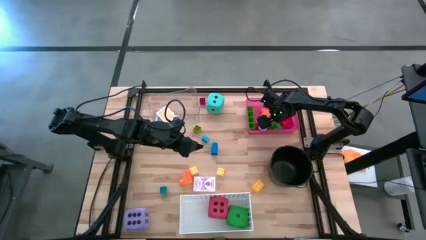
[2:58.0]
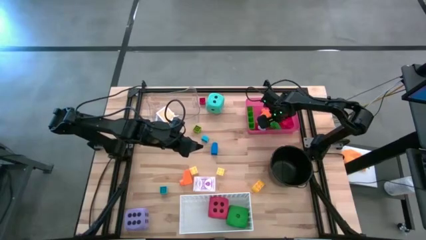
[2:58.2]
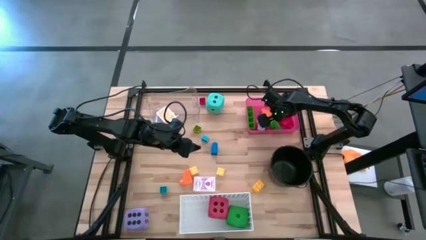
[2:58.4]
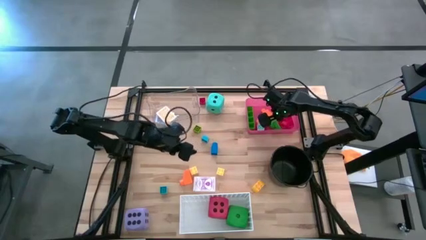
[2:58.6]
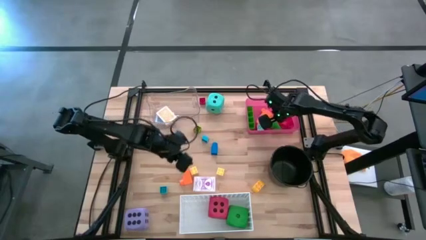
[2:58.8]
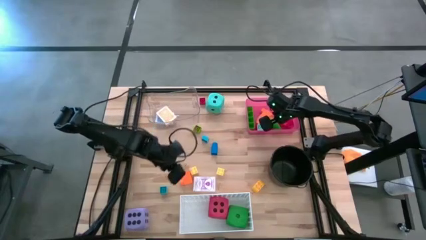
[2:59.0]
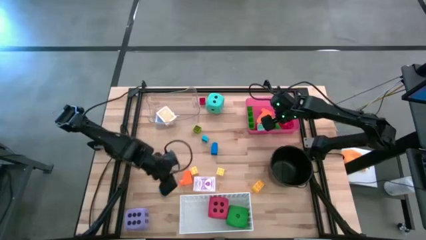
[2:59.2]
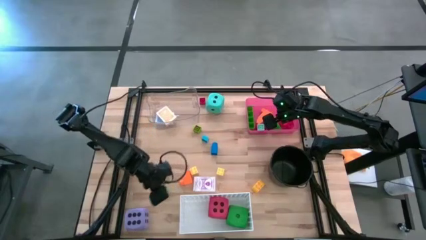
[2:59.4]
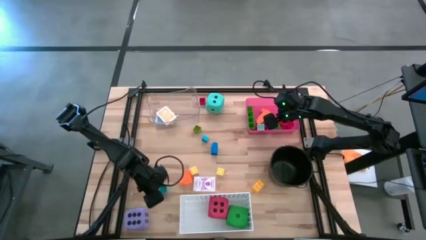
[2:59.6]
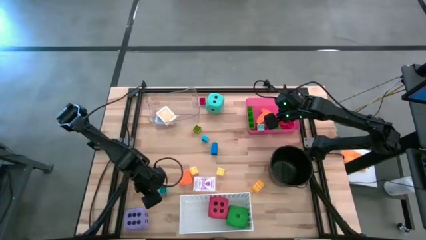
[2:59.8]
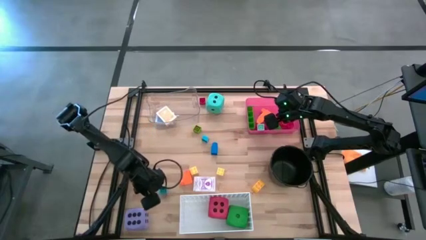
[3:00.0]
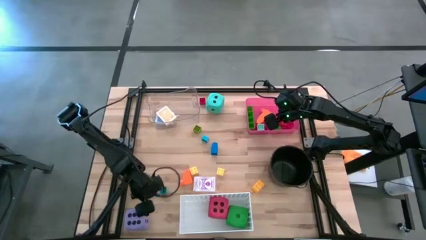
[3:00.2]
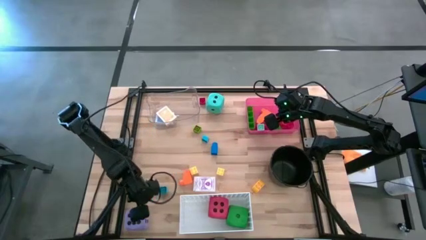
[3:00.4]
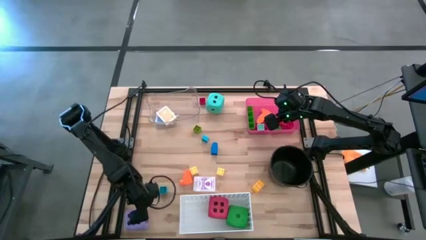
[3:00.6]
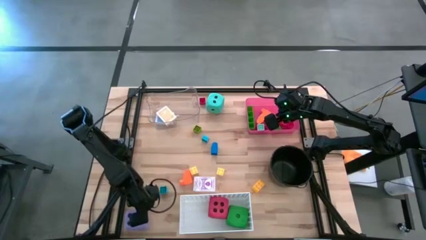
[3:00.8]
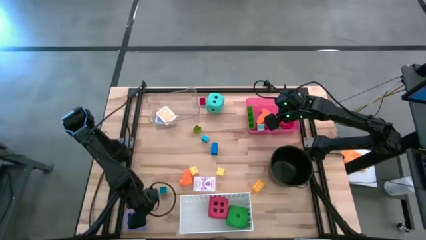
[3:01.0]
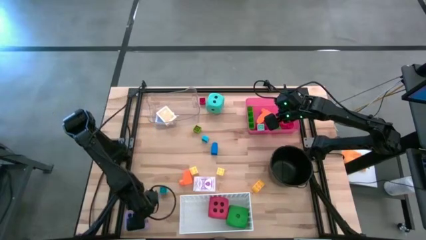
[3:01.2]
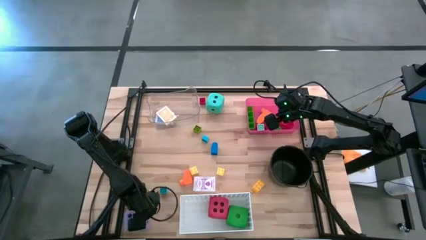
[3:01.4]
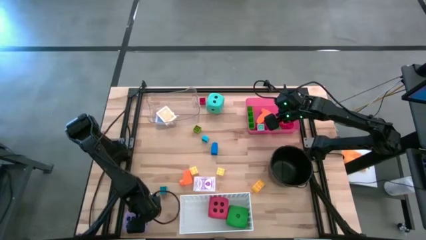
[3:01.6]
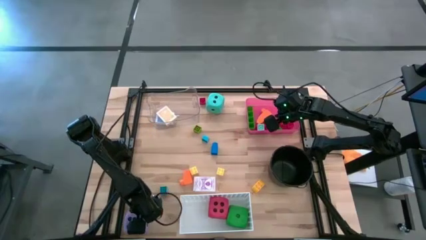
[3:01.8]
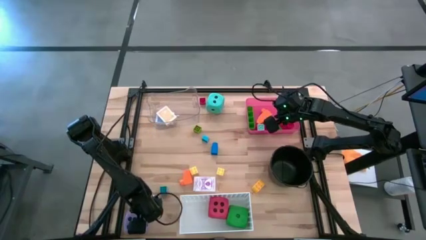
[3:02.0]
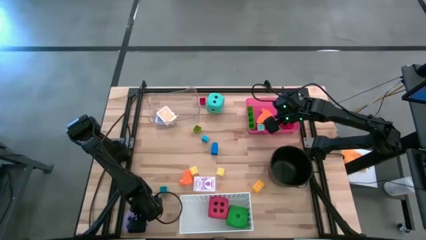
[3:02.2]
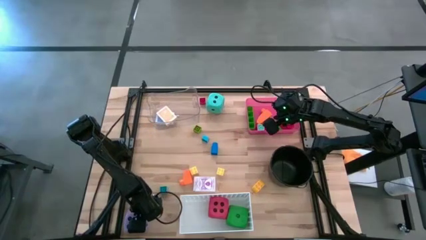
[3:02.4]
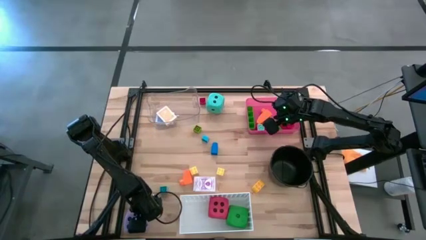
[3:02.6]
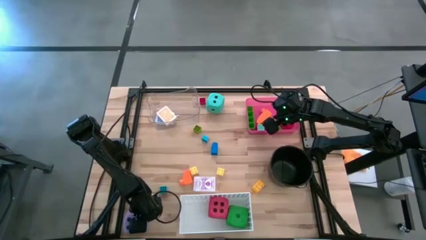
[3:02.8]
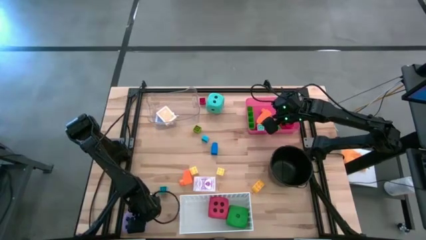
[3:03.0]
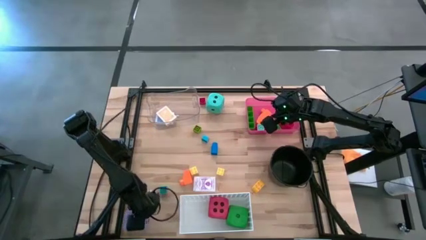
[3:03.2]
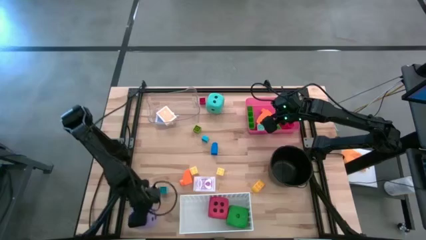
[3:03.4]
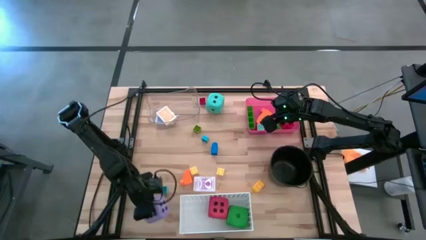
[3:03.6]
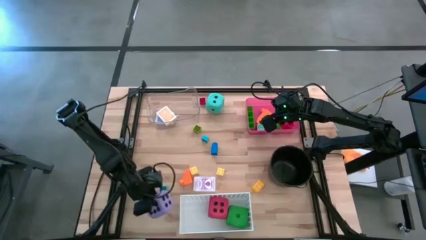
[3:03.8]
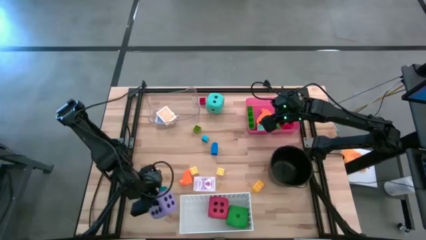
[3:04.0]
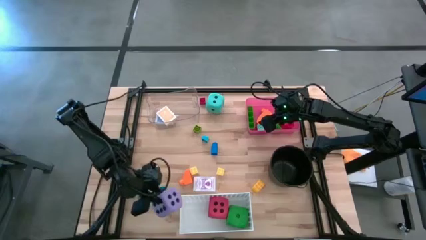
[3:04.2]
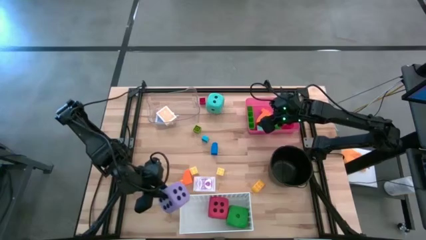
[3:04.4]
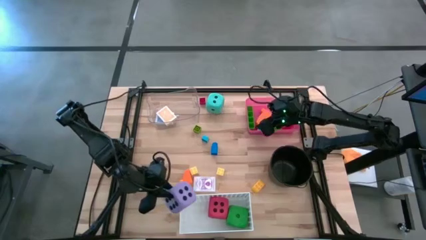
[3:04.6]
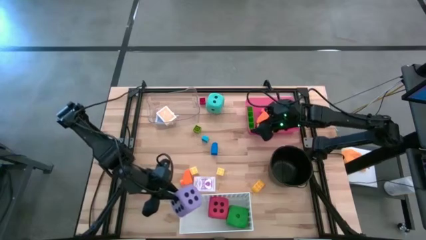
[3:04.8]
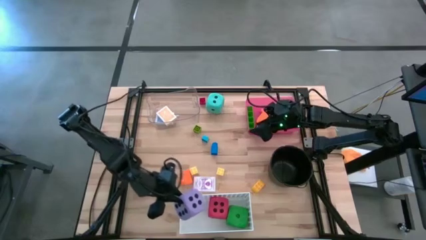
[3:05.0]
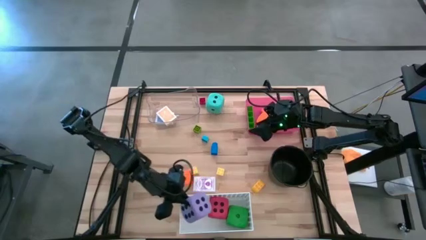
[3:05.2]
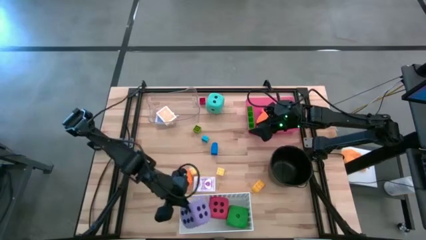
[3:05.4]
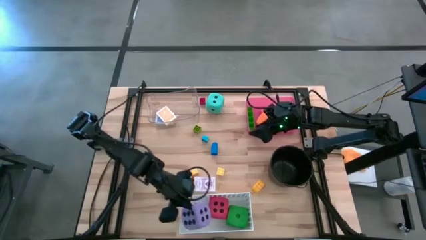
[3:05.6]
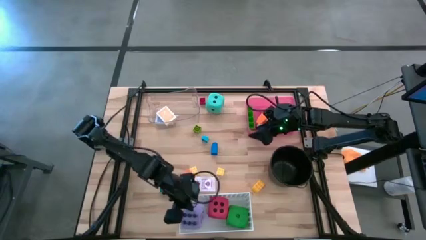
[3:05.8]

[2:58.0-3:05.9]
Task: Pick & Place Toys
Put the violet dice into the white bin

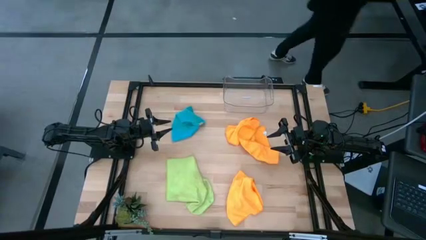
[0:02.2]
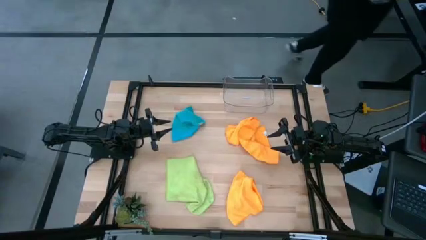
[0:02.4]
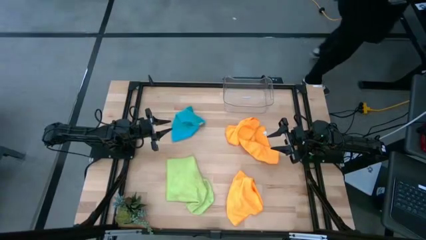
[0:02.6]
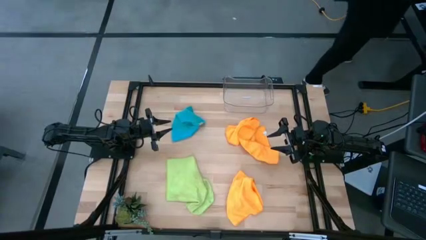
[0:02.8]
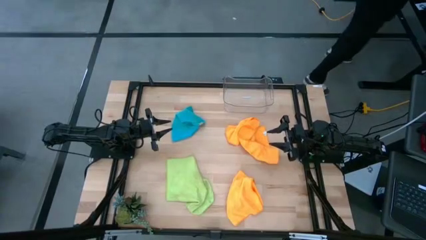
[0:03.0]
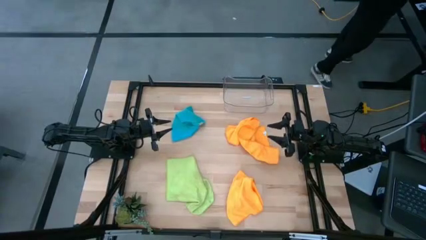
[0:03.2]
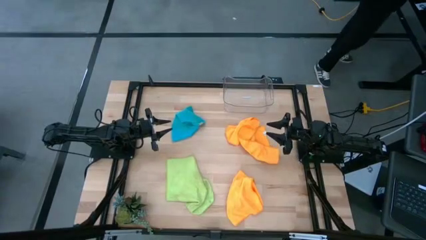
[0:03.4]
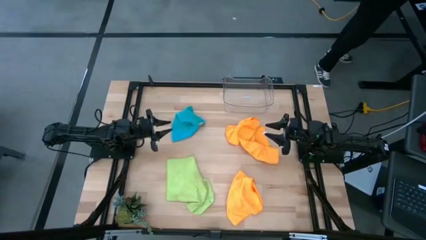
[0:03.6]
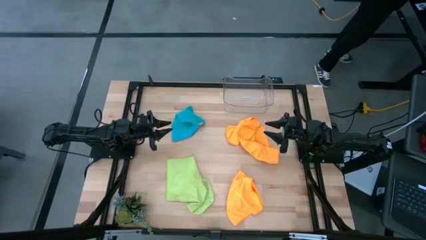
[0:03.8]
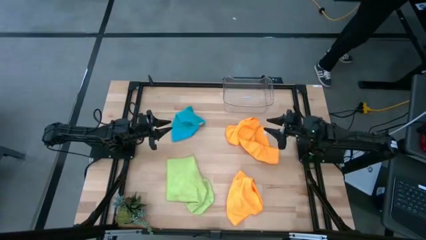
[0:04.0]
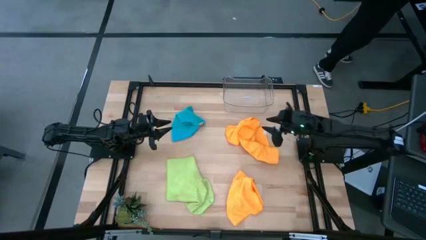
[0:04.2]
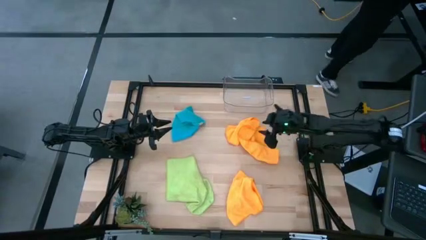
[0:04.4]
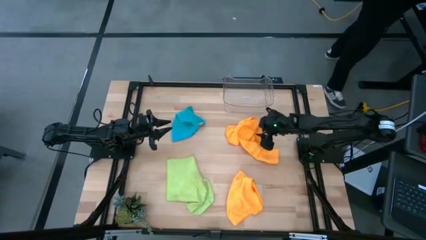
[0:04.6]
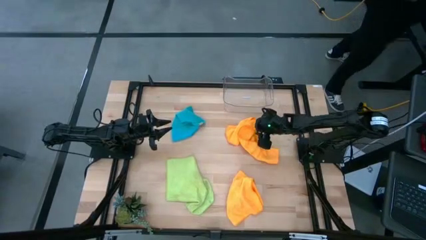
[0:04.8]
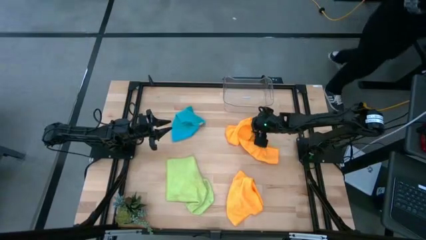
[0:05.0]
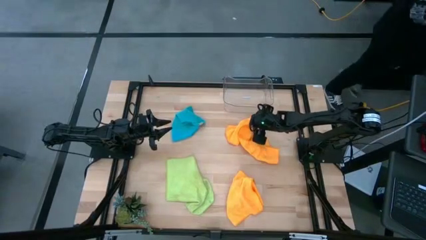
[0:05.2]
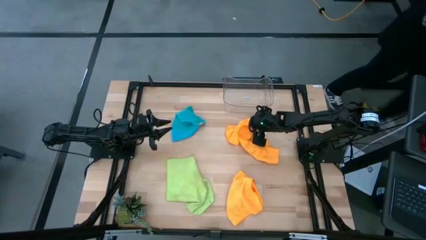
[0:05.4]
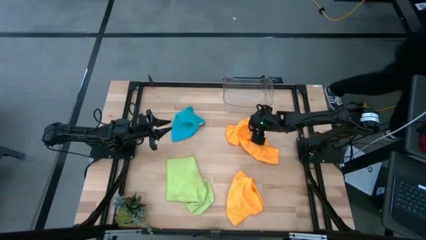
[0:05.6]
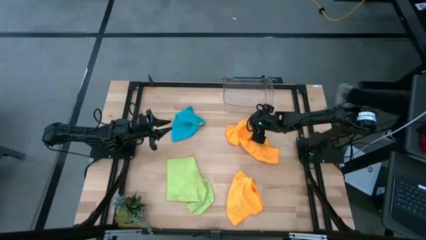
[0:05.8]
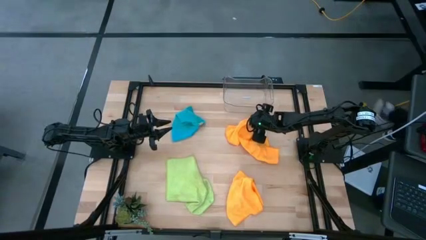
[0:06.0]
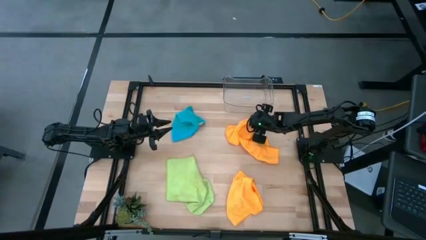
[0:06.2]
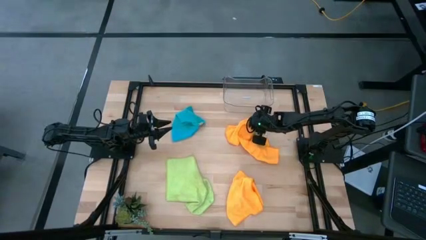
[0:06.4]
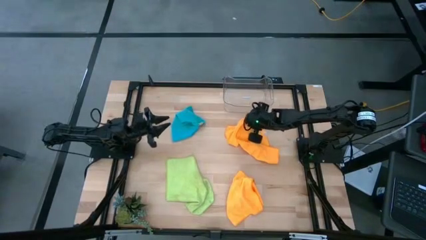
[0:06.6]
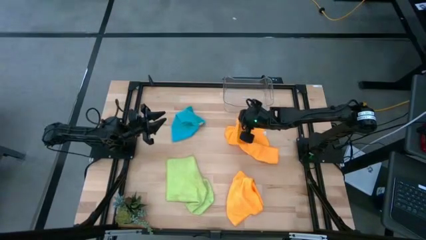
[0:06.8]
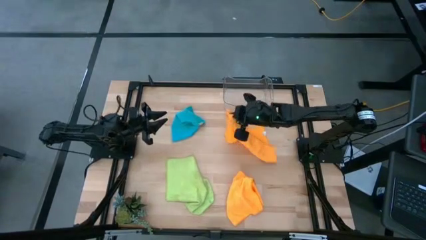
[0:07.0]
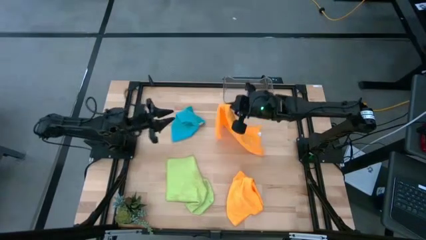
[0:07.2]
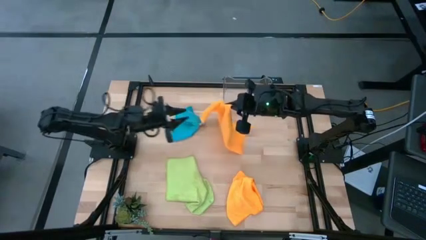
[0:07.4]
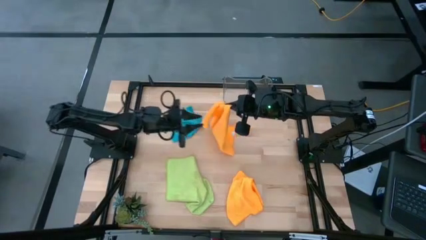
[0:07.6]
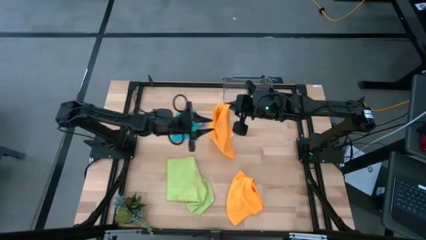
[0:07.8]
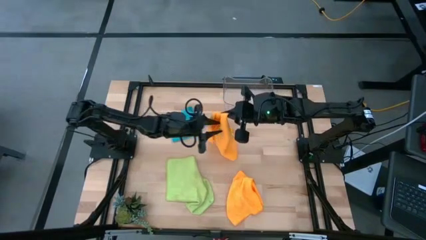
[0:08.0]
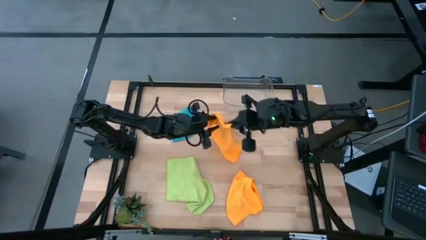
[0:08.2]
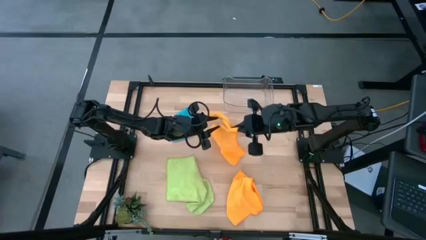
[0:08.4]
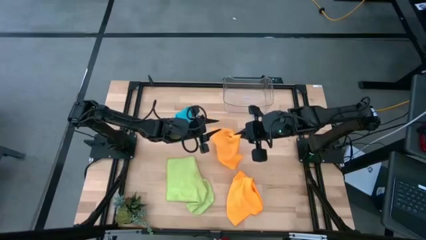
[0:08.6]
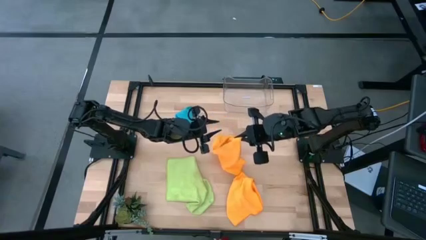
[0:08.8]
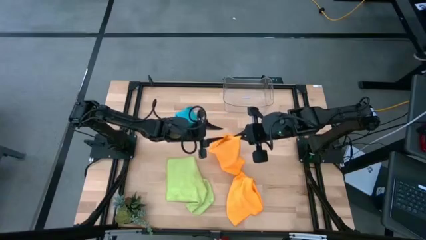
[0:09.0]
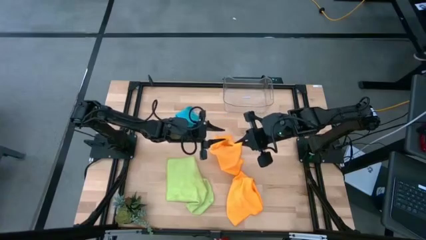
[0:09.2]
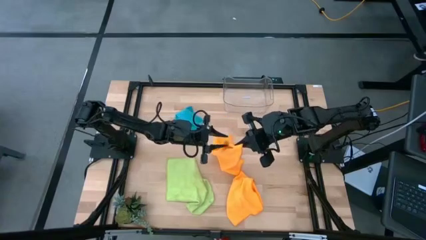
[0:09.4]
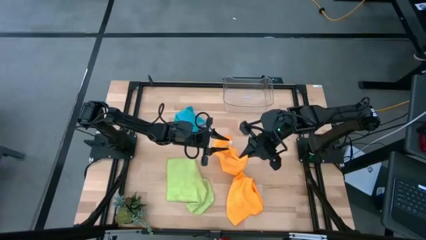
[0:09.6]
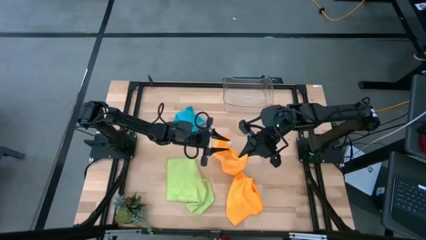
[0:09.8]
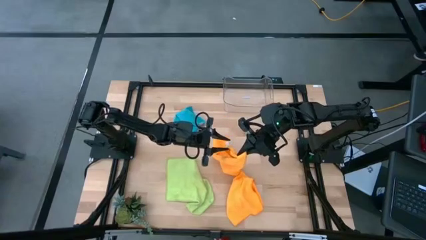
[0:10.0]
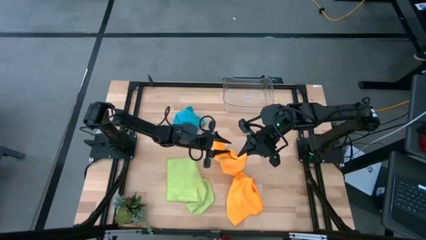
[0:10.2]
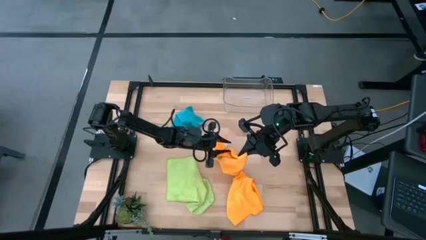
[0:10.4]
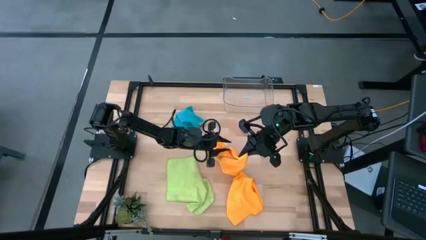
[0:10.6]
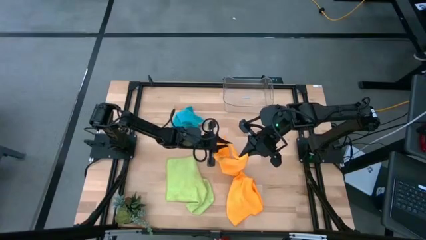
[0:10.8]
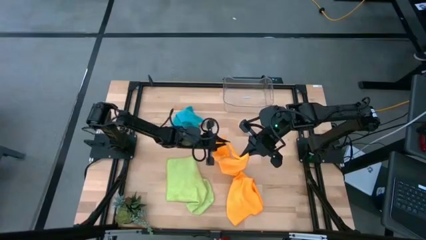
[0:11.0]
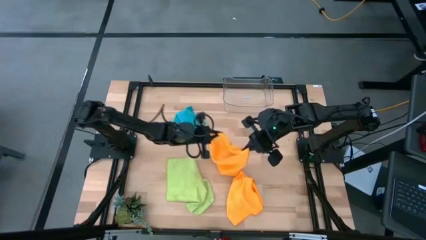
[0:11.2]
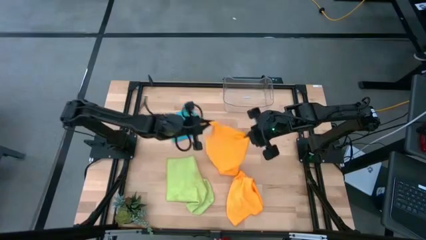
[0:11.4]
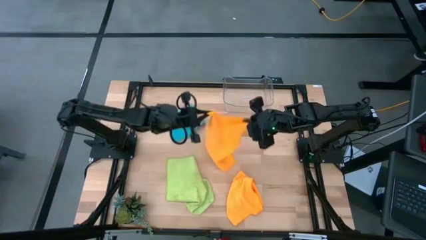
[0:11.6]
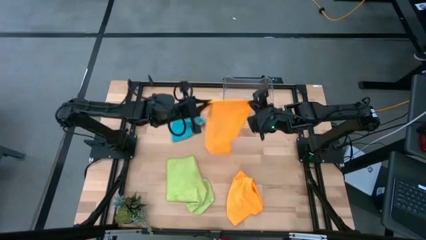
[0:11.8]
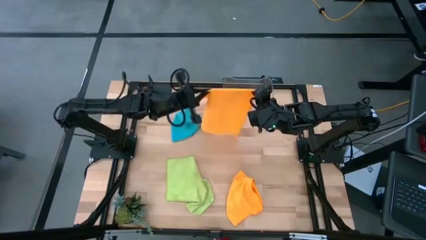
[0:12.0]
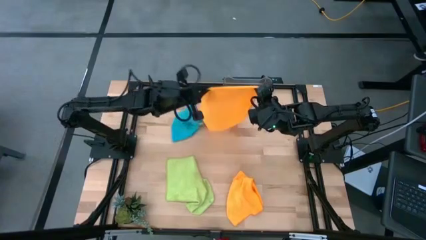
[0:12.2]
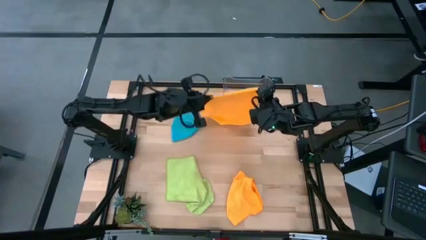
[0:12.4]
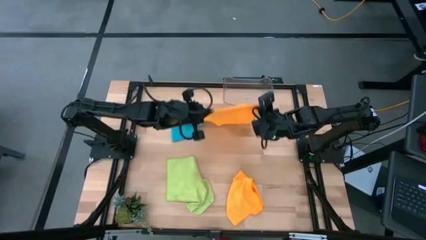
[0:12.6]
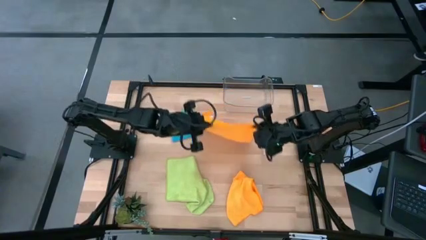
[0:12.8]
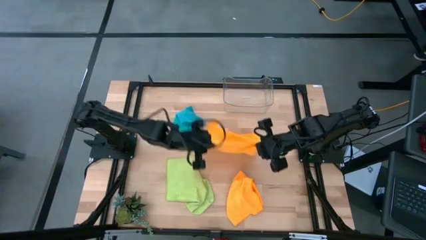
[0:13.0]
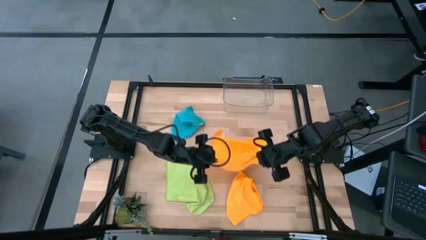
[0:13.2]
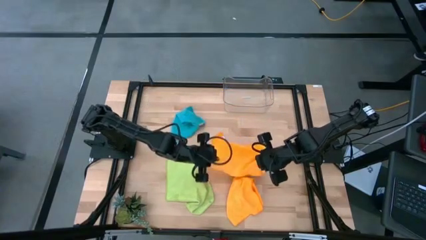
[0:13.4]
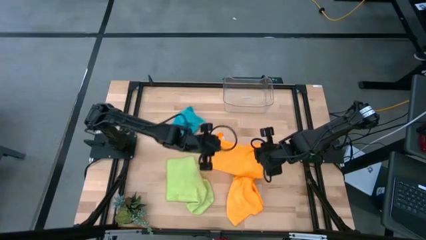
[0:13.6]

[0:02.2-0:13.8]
Task: Fold microfiber towels
Fold the top orange microfiber towel
